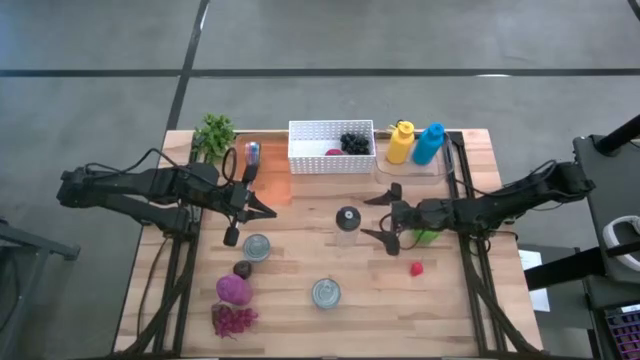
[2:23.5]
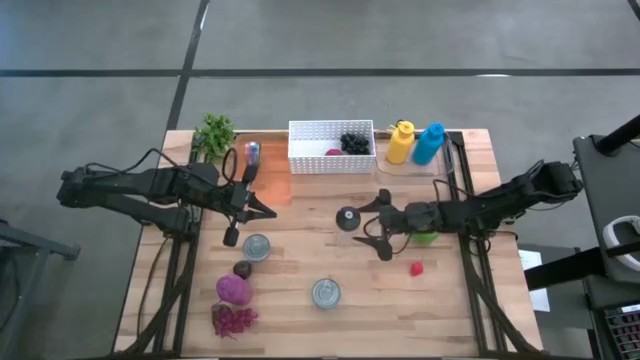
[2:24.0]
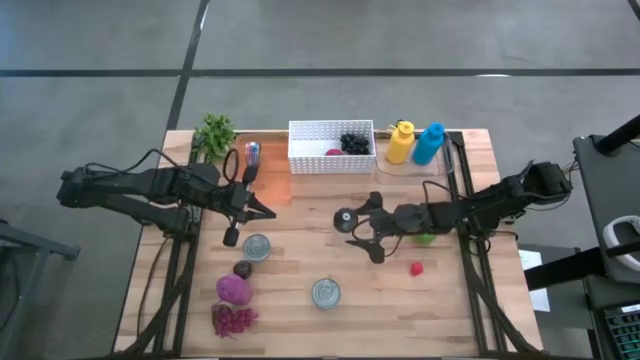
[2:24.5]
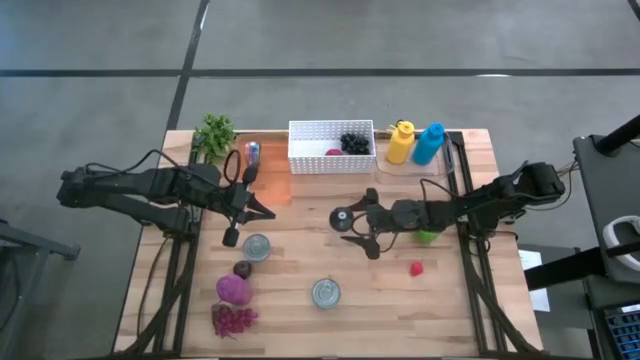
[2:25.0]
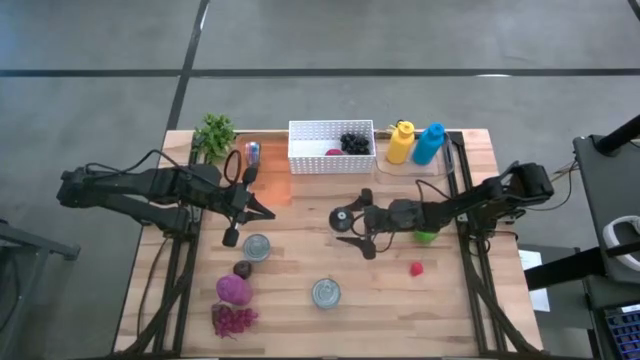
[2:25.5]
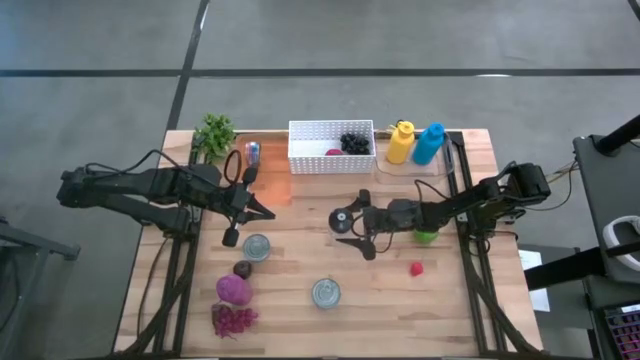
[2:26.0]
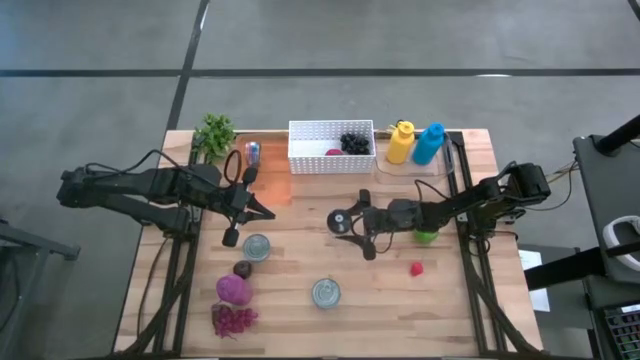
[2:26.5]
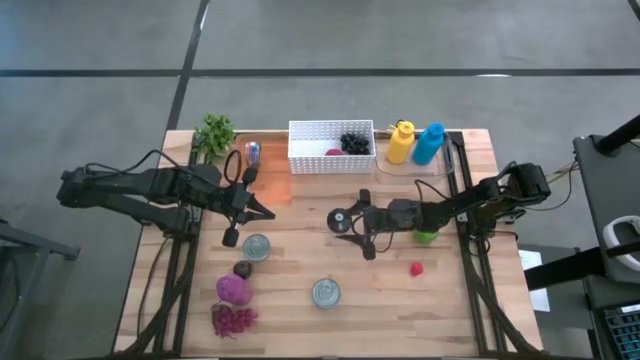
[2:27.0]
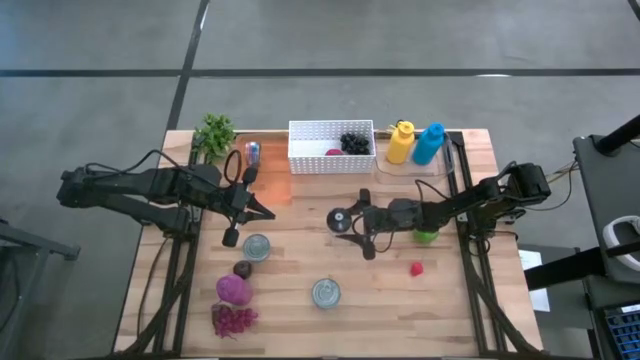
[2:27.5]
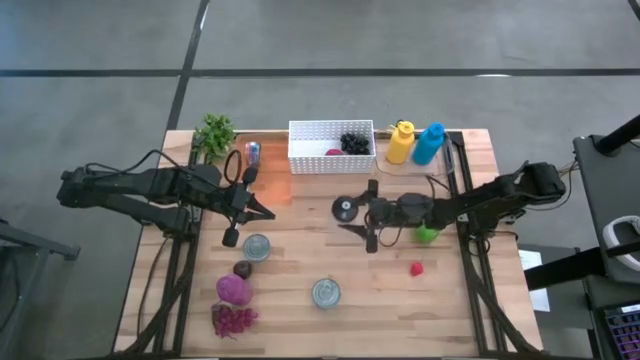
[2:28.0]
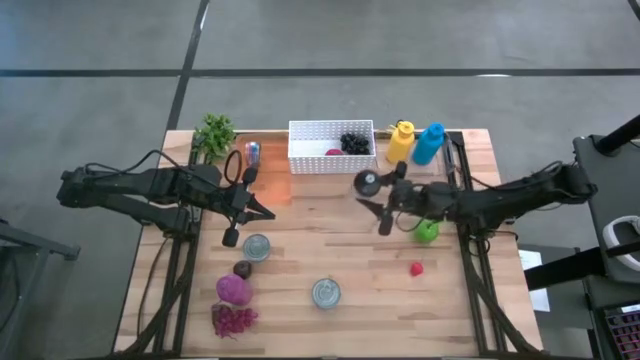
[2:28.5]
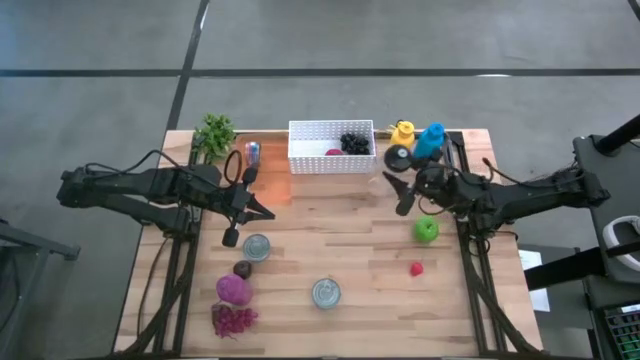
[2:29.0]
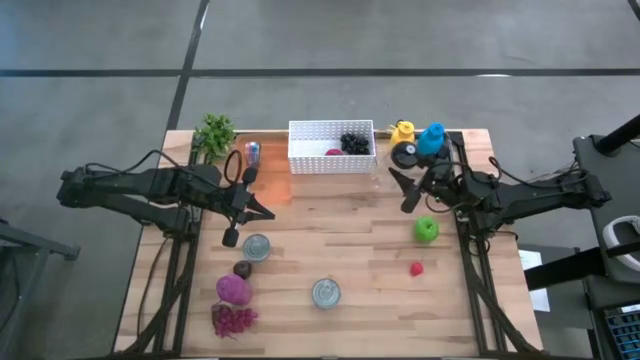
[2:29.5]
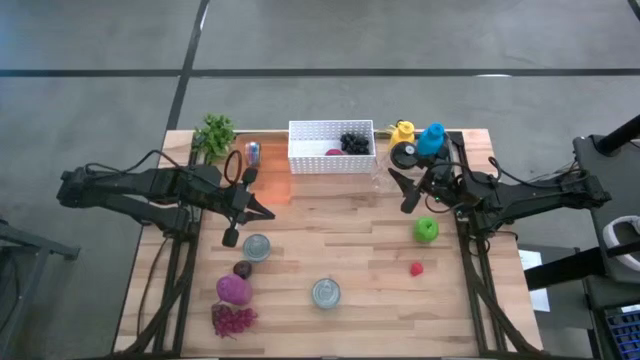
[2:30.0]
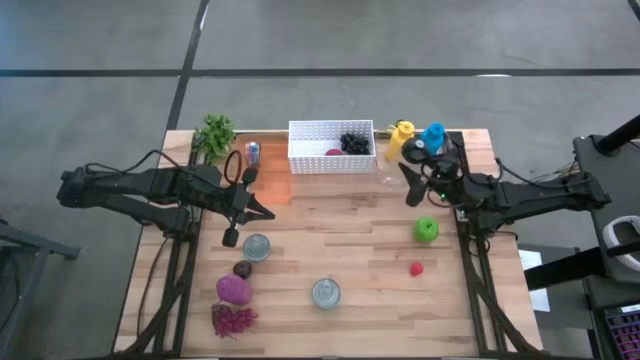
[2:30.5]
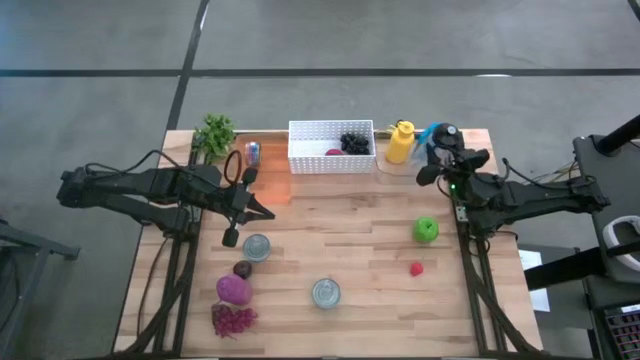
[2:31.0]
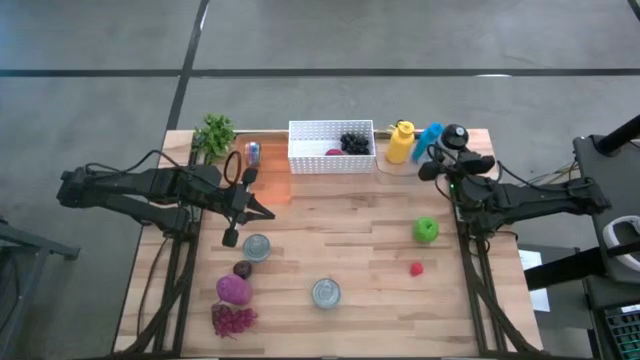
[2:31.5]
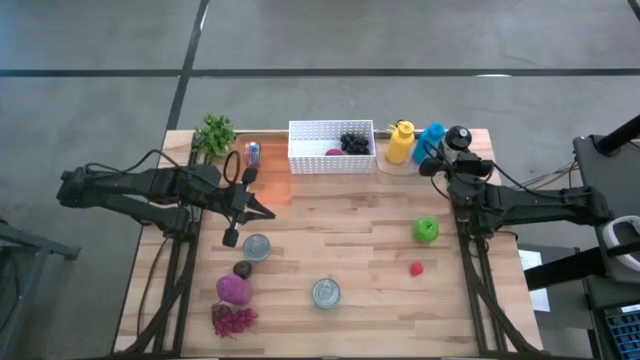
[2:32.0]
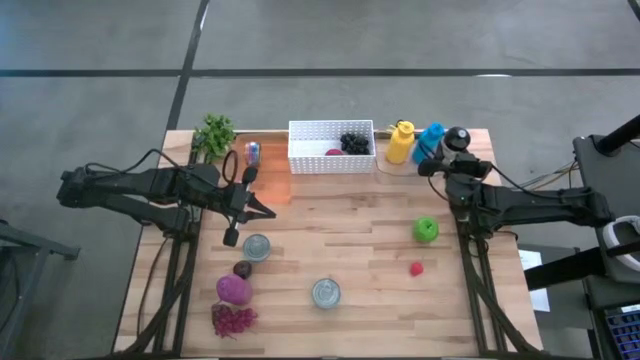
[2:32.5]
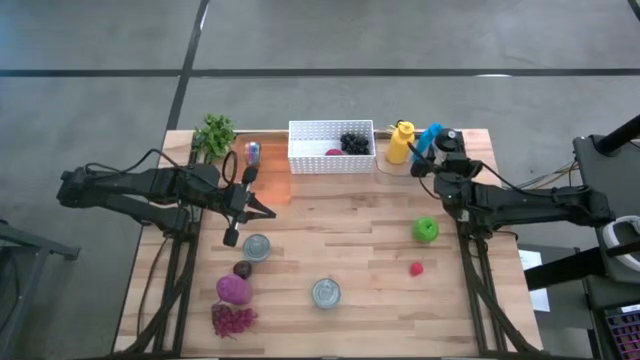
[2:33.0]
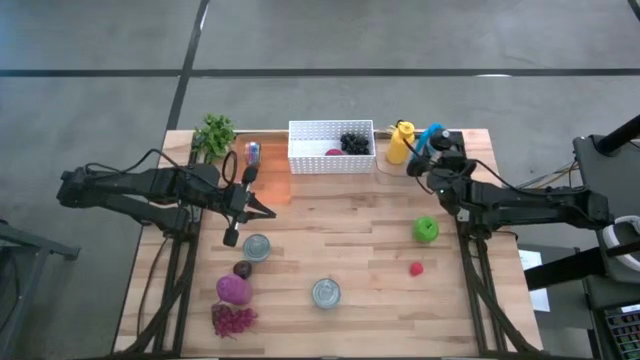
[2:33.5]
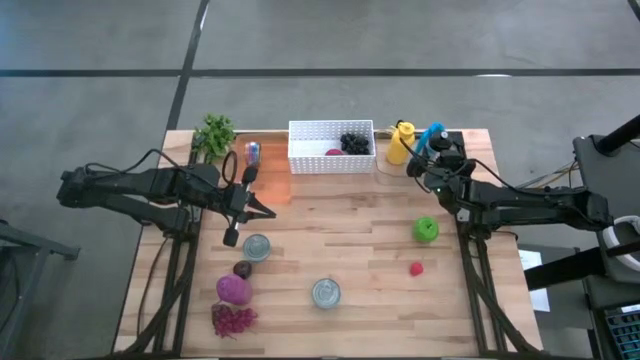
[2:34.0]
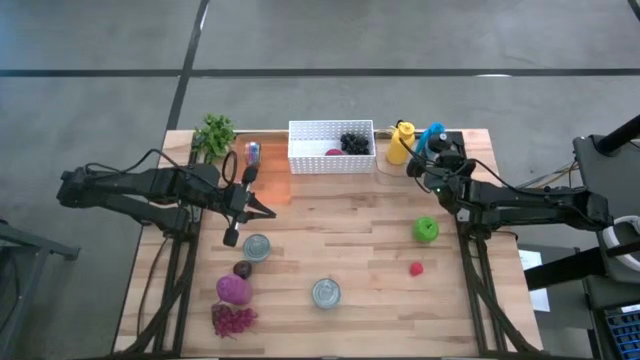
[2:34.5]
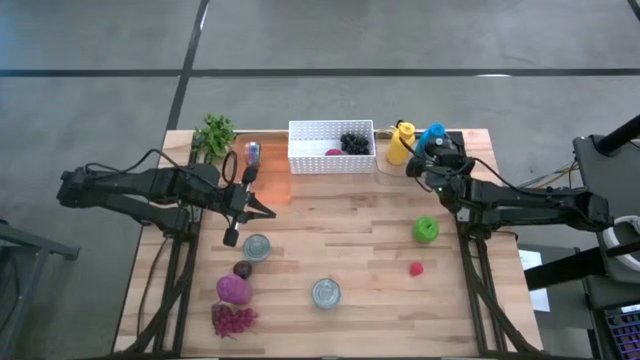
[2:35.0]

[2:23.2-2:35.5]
Task: Pick & Place Food Item
Put the black water bottle into the transparent bin

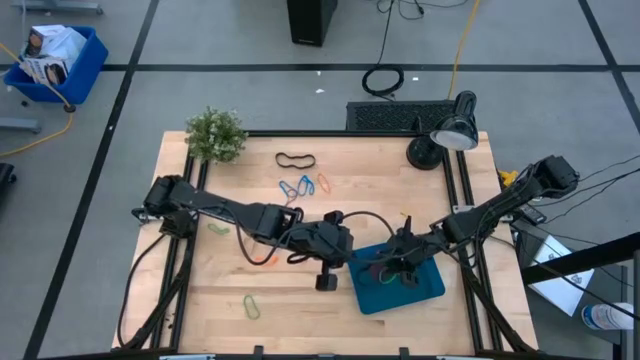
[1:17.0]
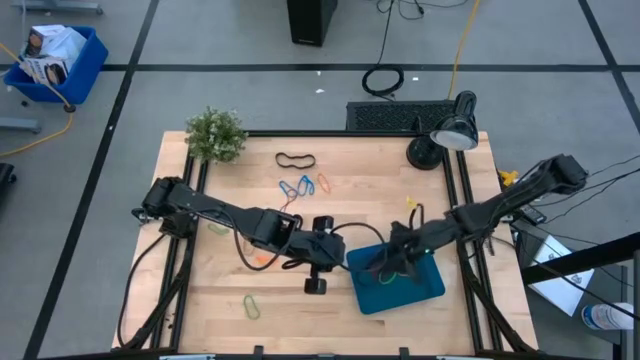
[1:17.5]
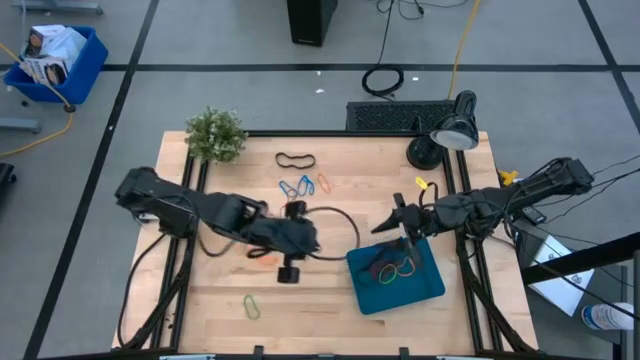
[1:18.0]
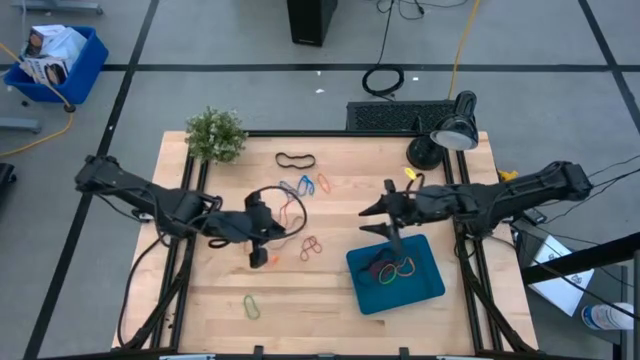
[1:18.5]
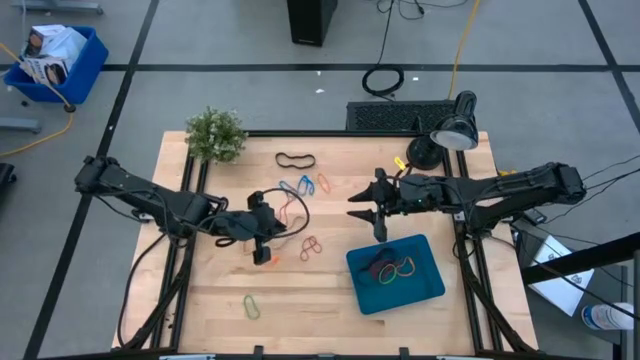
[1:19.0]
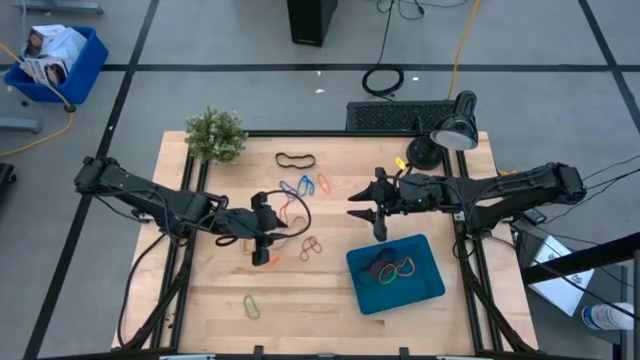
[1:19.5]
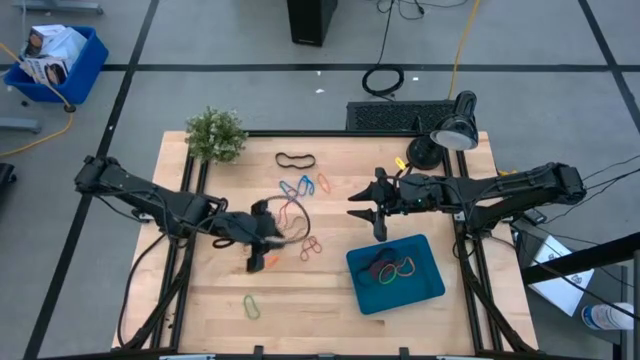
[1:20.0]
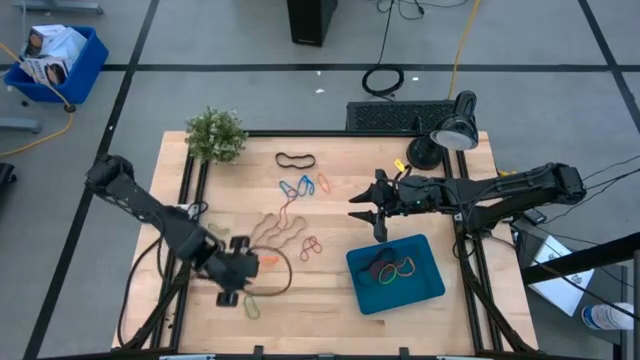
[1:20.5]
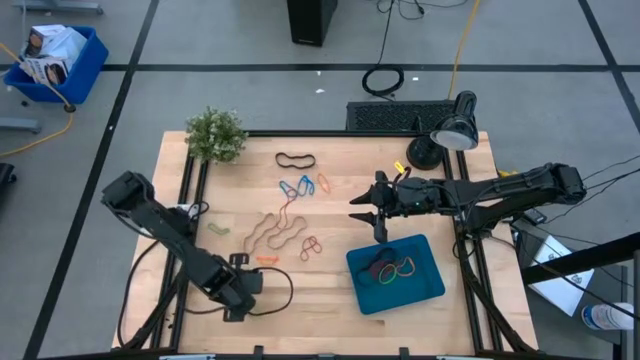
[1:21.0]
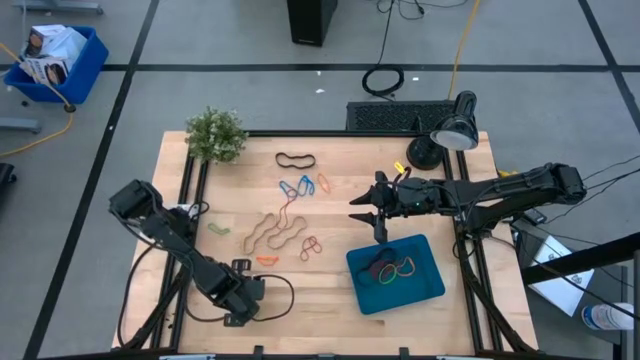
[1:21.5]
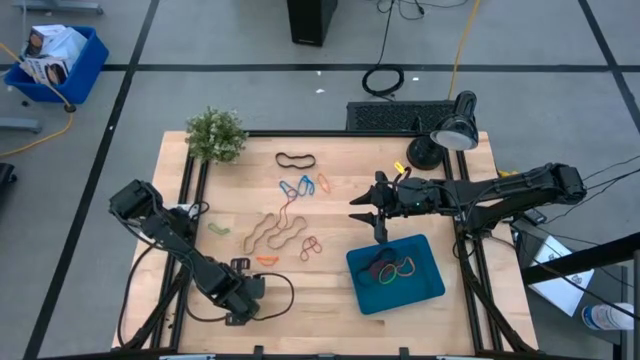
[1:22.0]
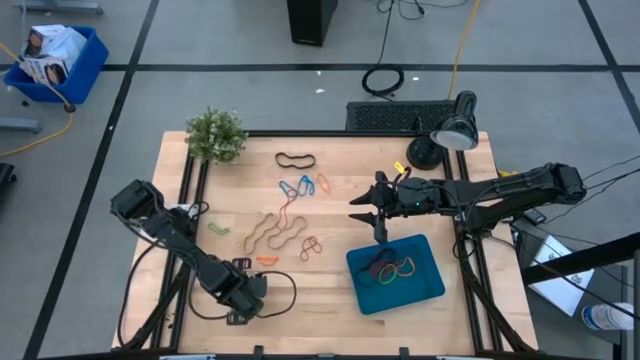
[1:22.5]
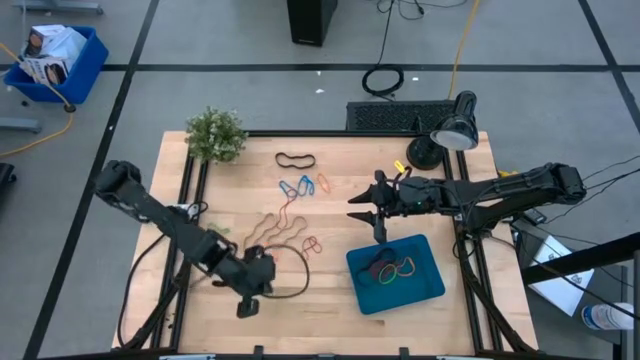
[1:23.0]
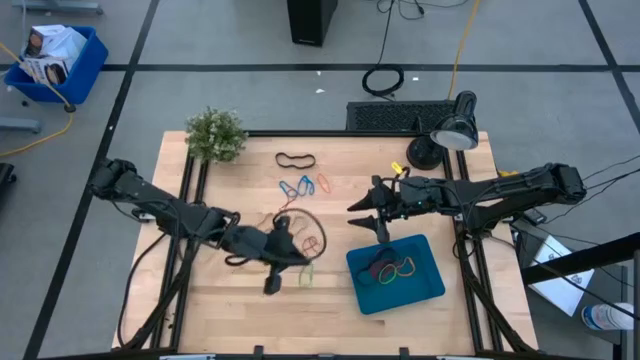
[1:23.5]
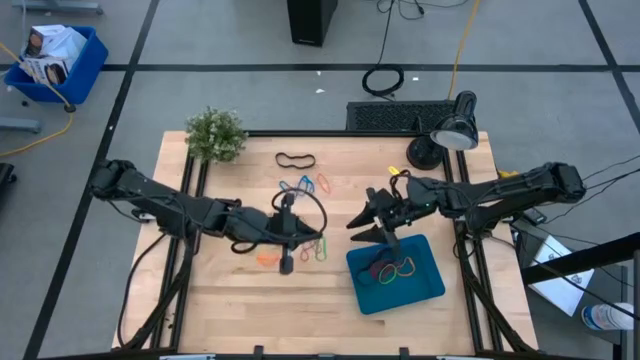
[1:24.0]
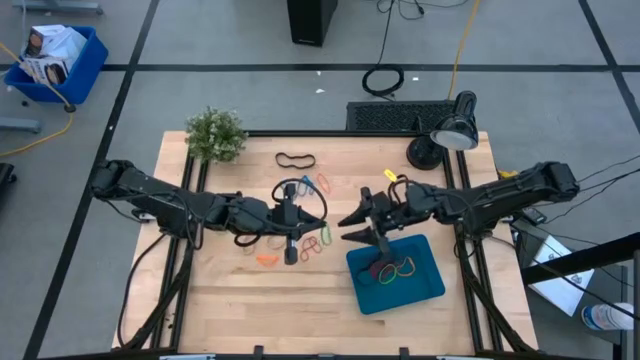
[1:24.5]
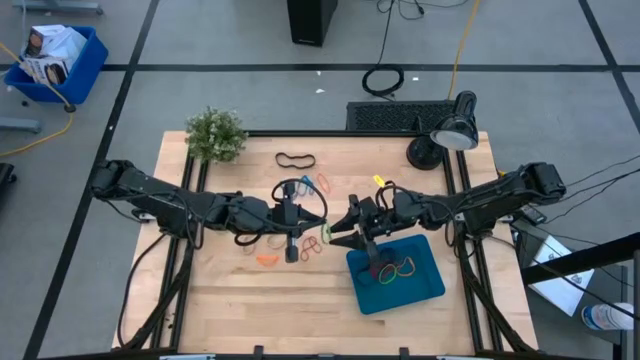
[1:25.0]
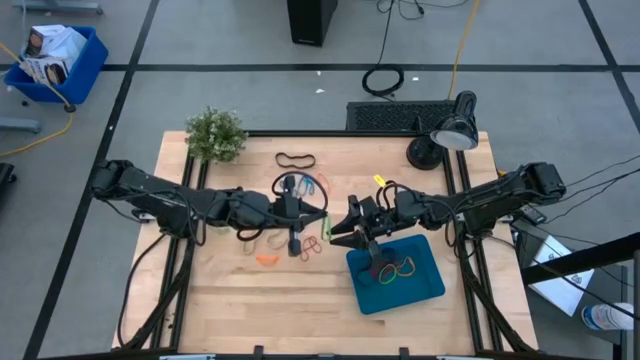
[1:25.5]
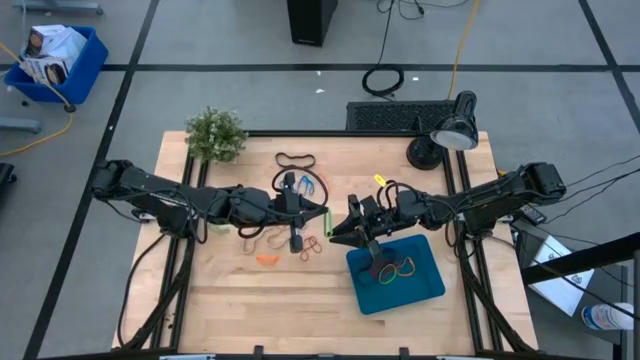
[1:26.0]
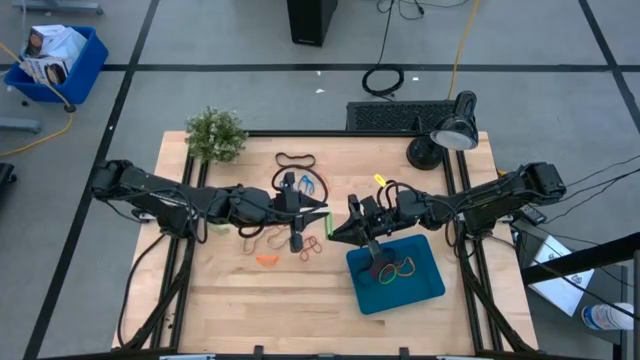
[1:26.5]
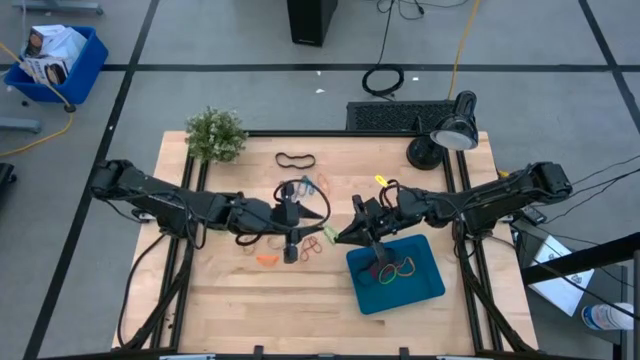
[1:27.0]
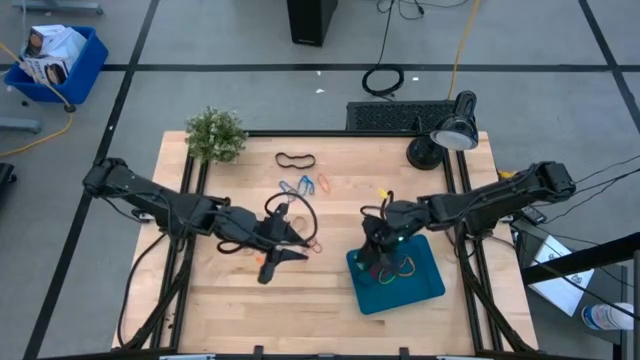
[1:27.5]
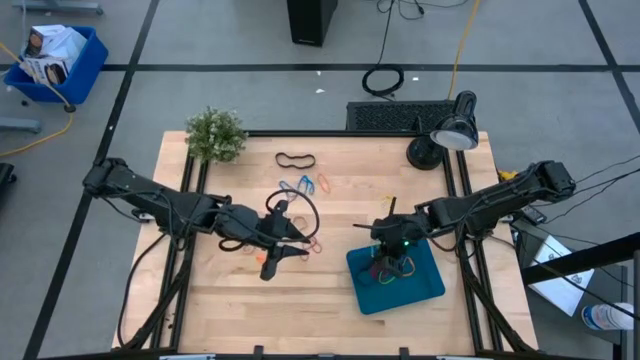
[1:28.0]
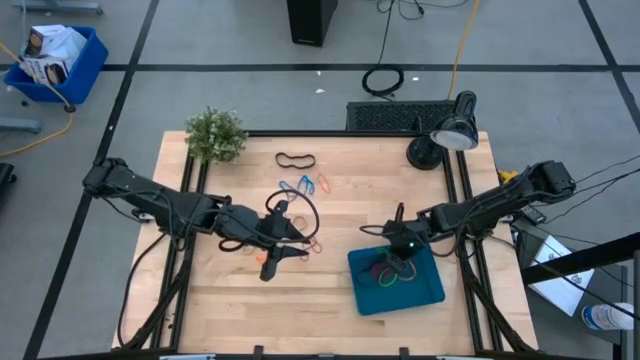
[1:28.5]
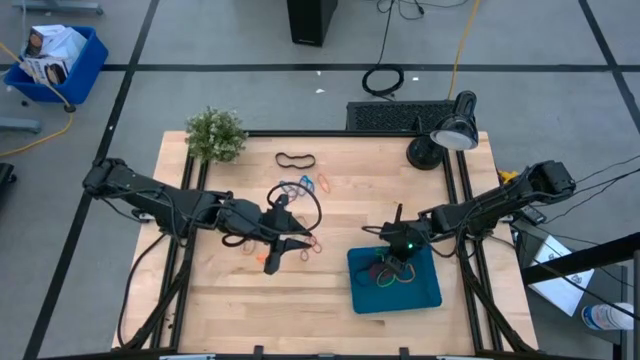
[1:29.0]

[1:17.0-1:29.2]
Task: Pick and place rubber bands into bin
Put the green rubber band into the blue bin
